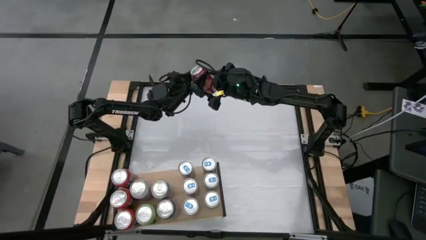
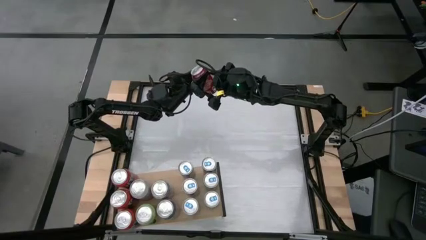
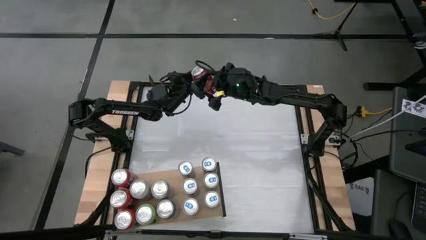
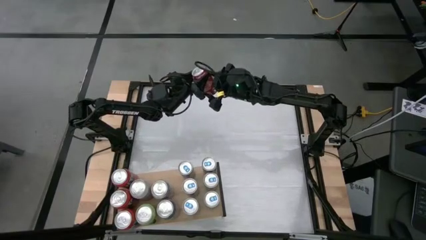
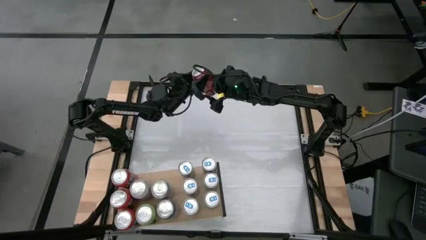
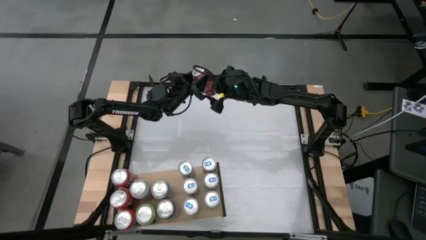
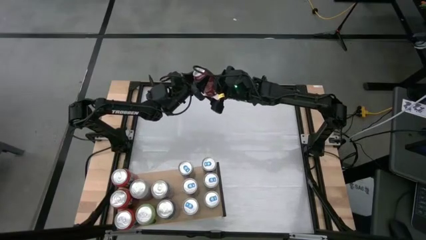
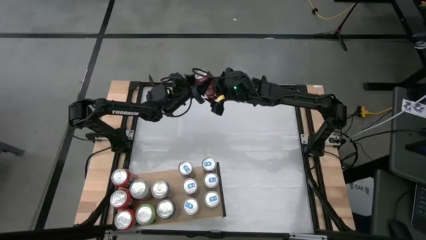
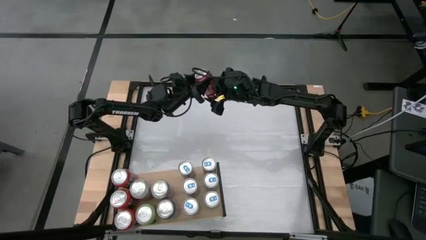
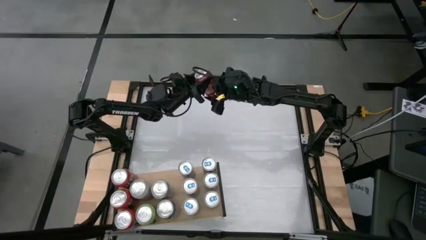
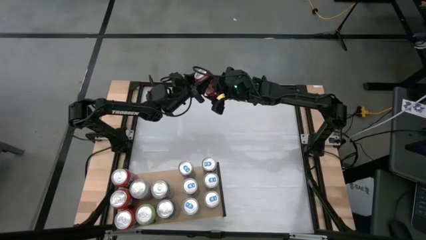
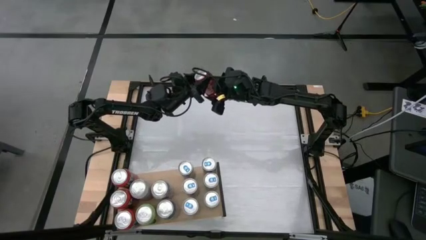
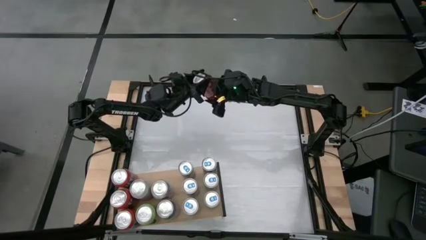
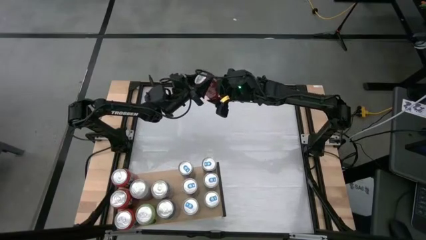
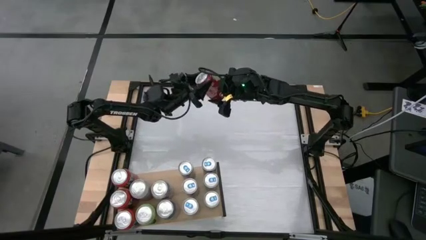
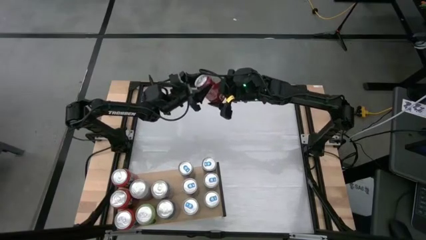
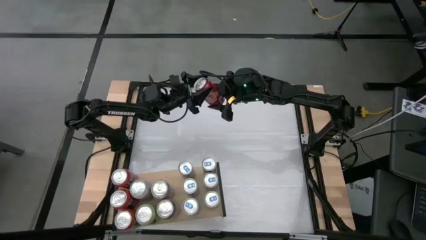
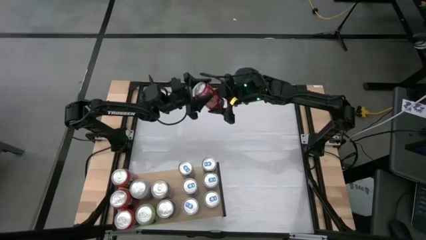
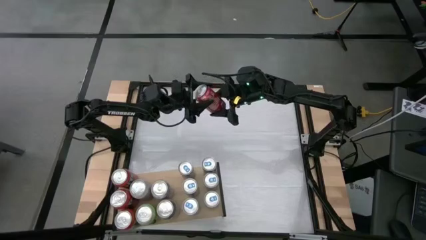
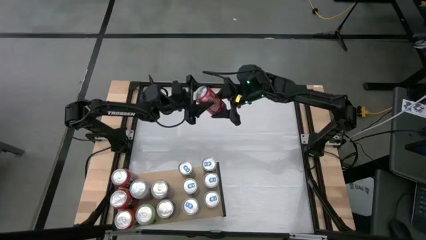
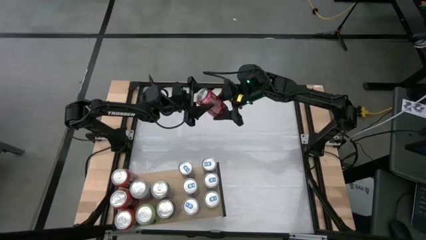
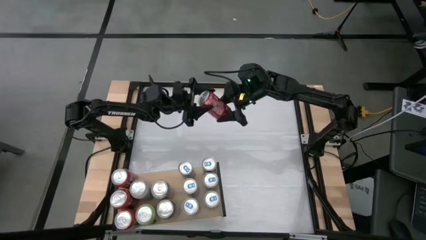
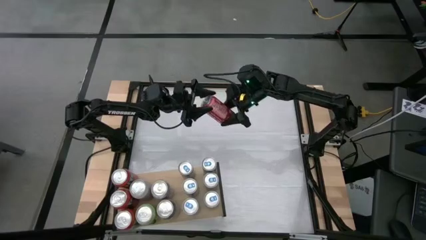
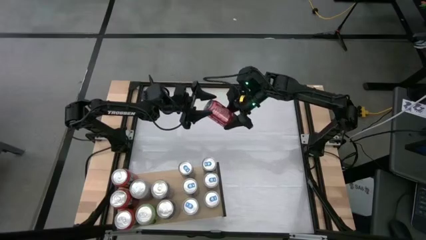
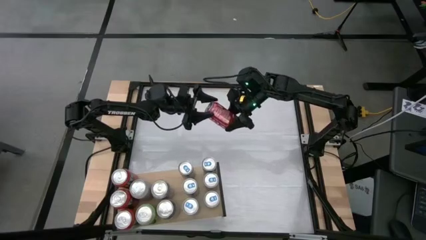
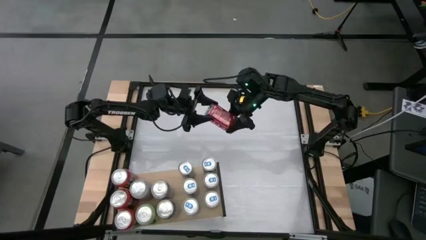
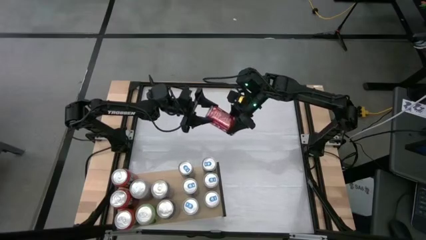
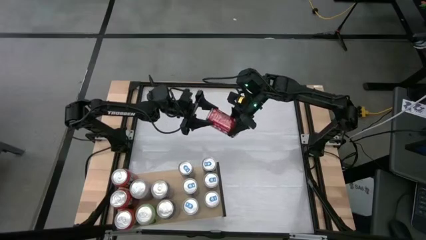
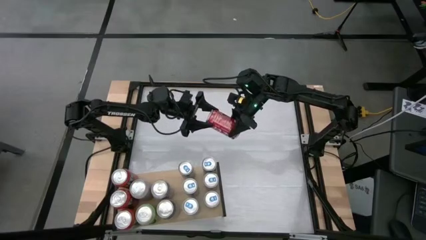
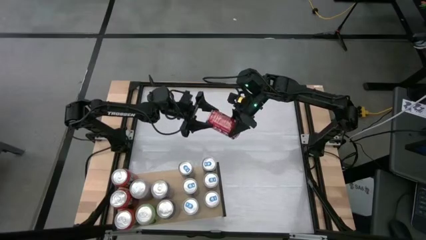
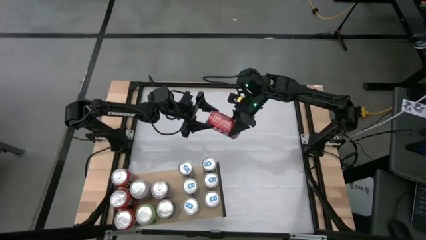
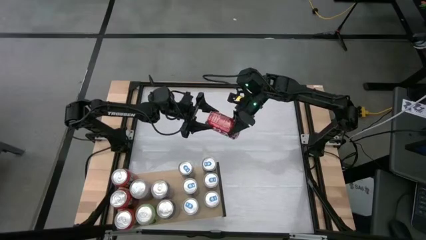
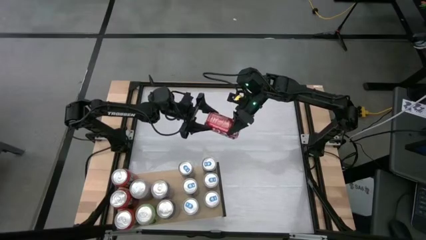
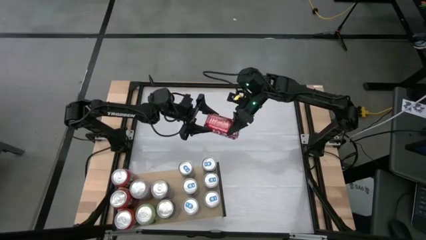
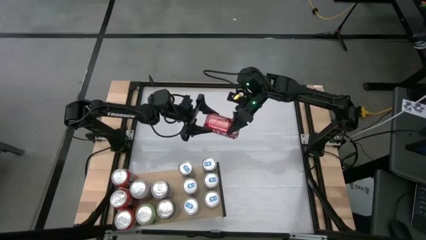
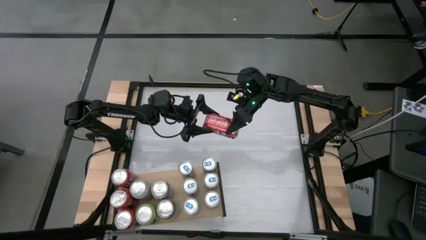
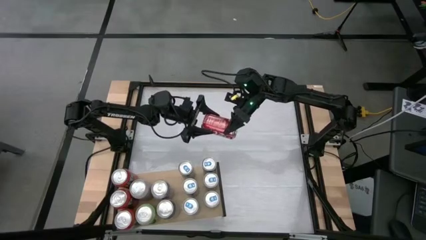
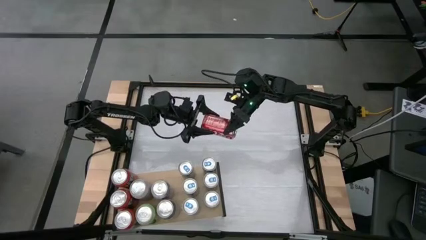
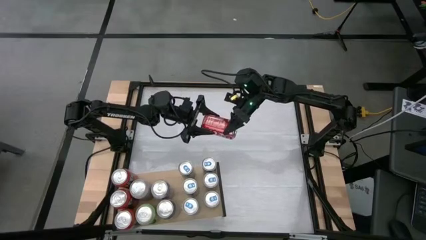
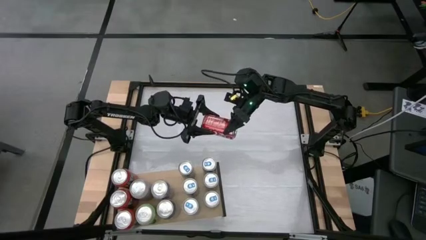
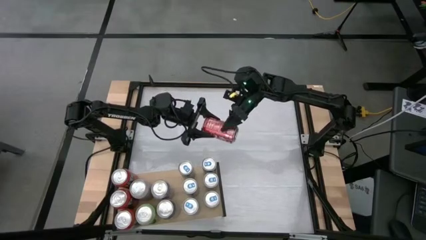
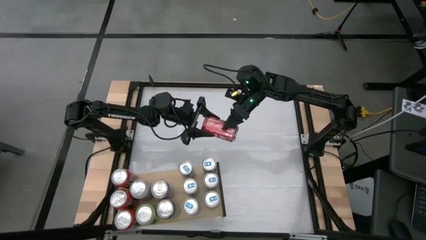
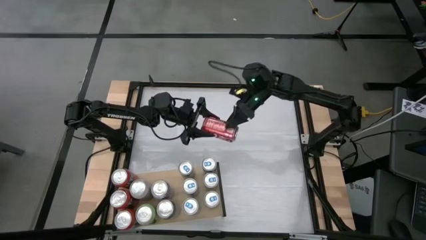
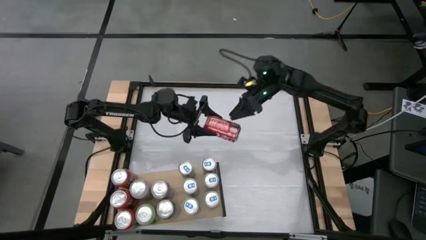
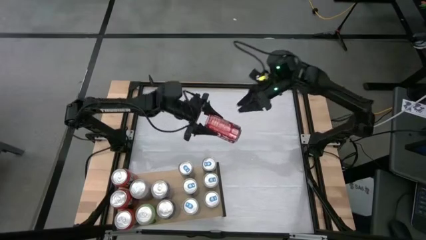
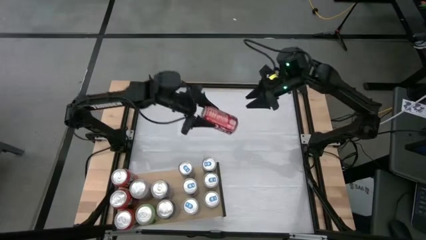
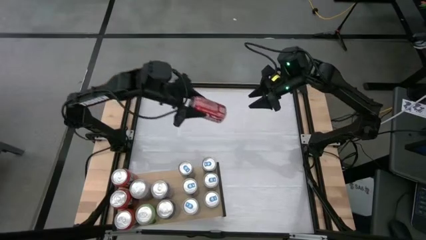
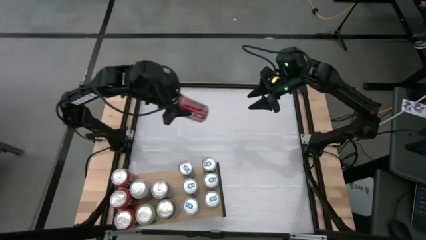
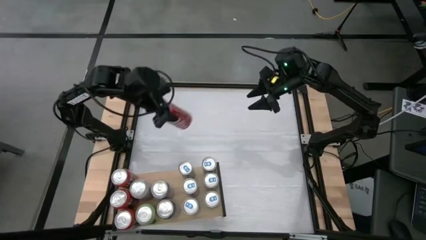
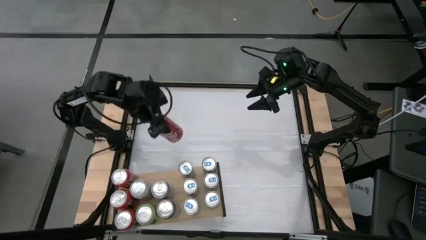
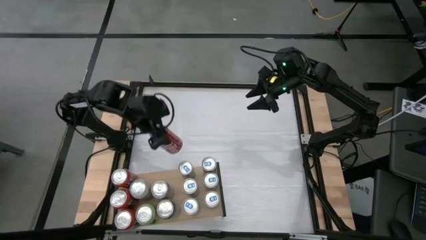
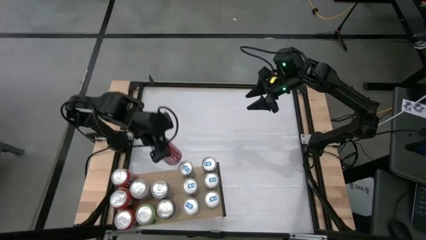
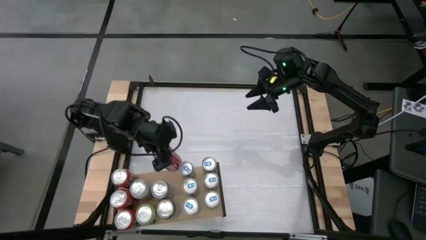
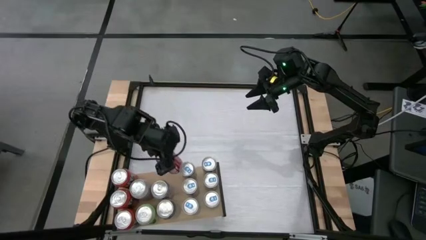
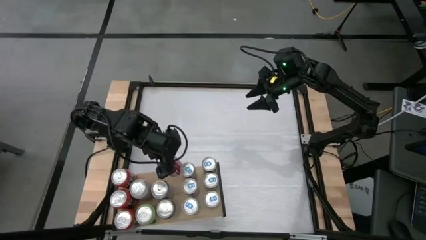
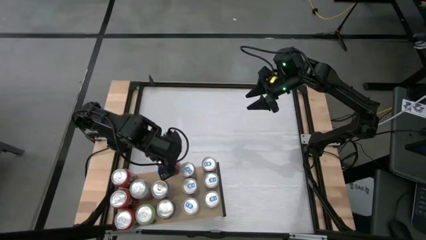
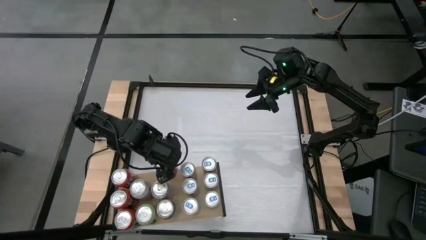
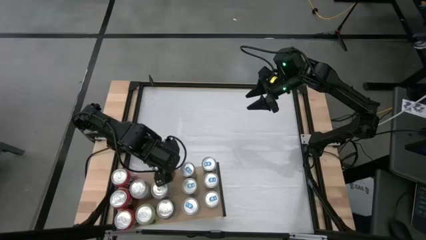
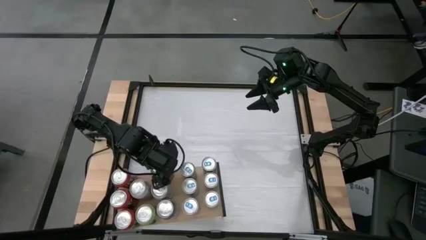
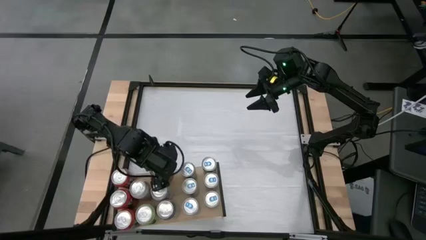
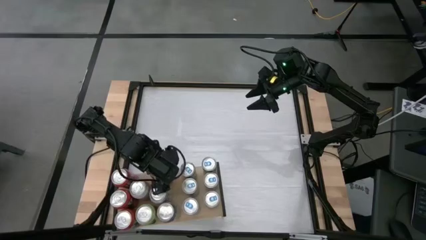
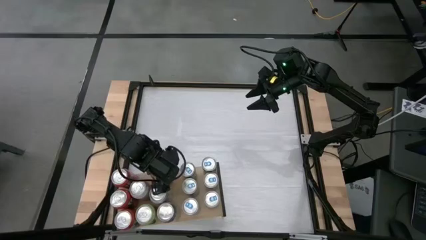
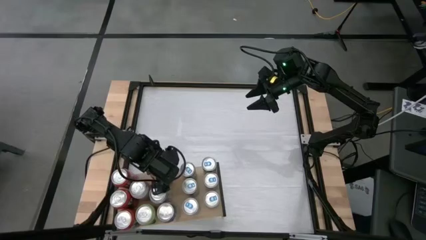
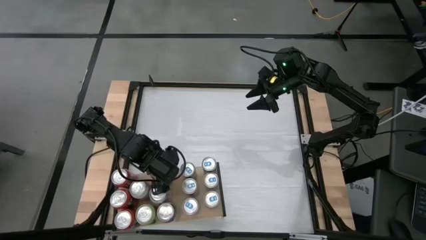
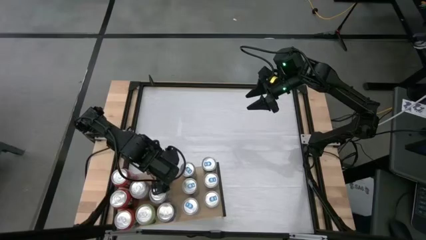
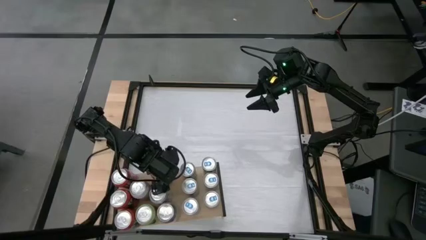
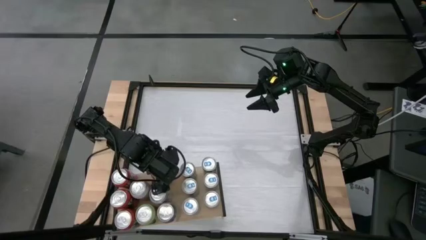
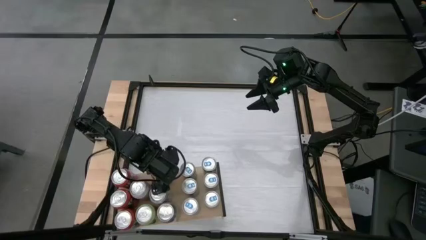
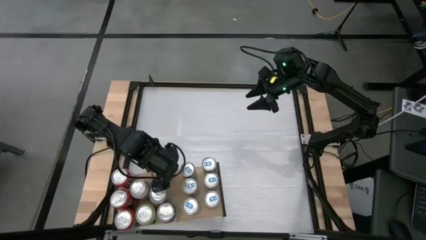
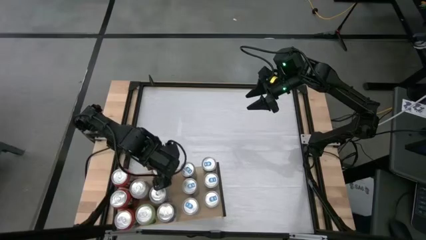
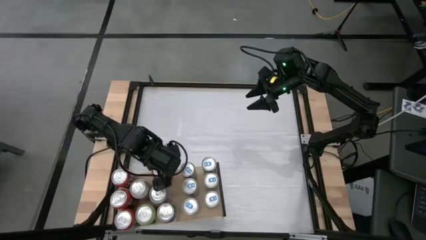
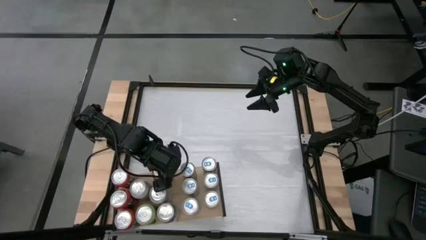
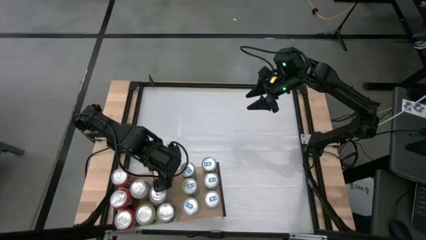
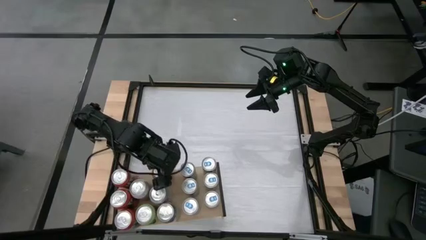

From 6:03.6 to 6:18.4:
Task: Place canned beverage on shelf
Put the red soda can on the shelf aligned with the silver soda cans

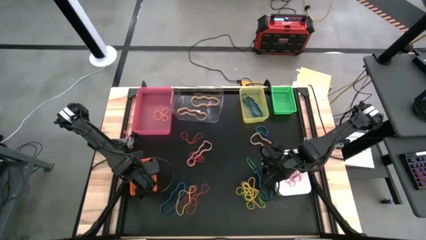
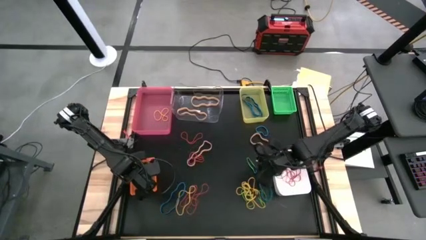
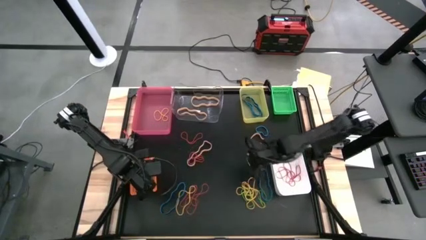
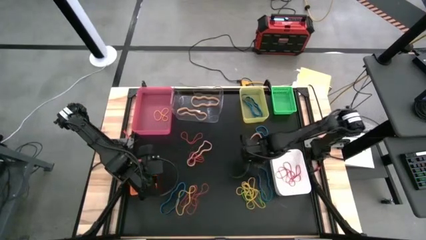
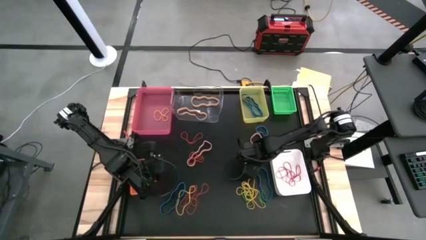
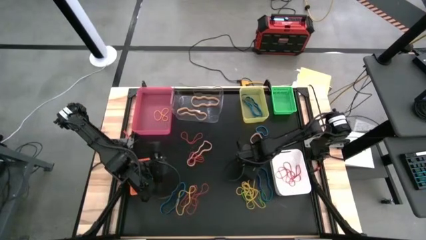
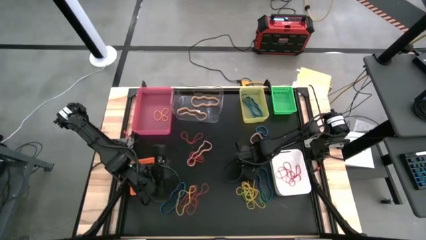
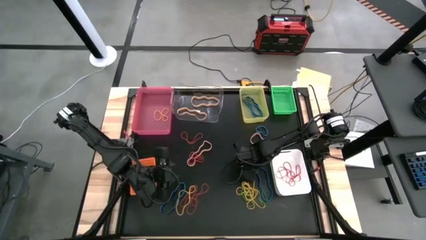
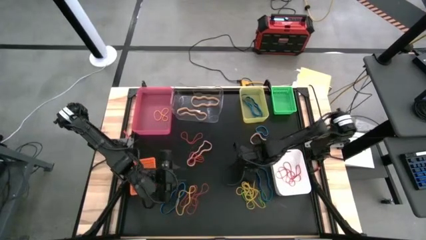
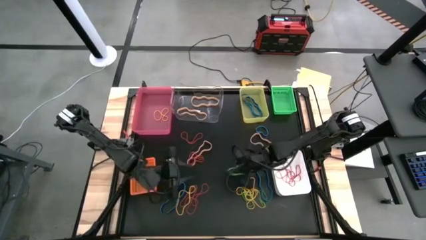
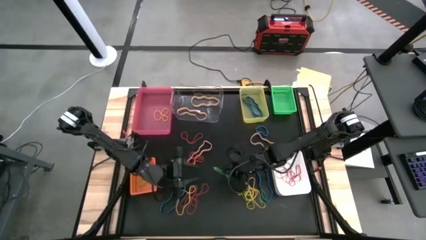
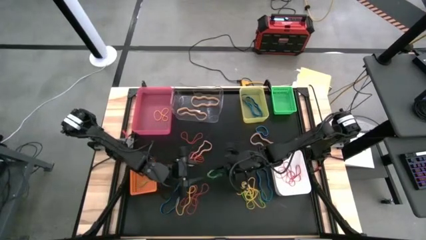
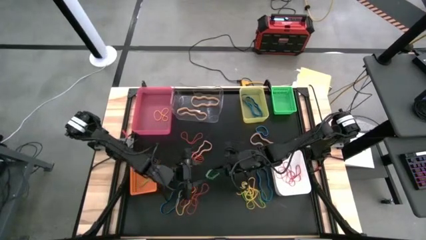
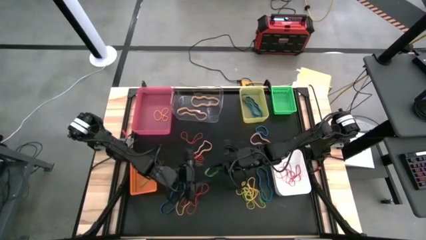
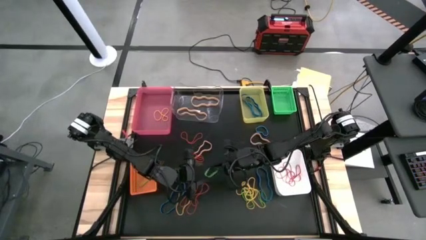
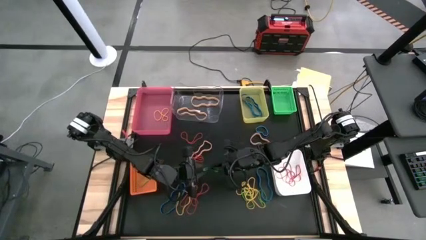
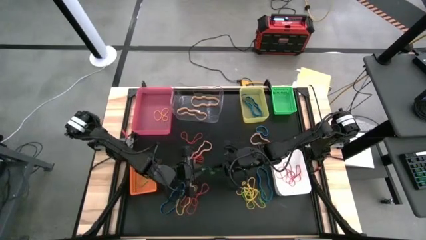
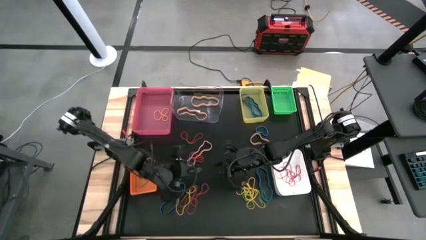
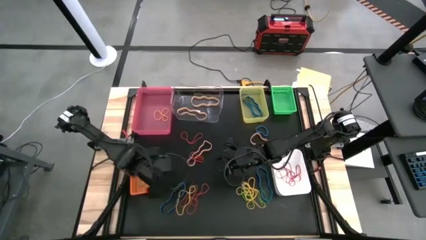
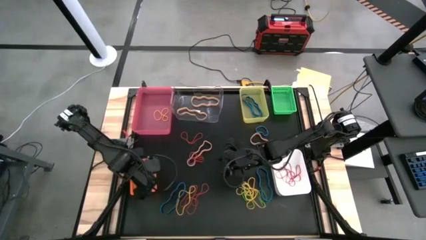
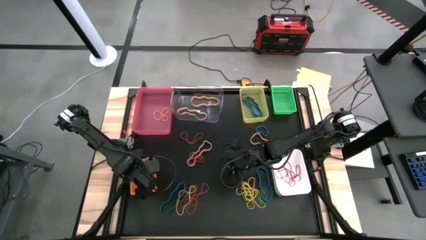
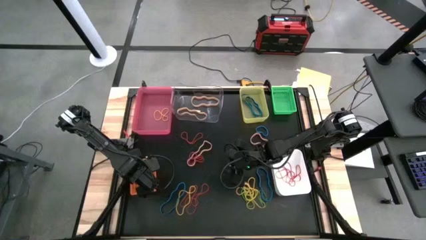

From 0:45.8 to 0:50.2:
Task: Sort rubber bands into baskets
Put the green rubber band into the orange bin
